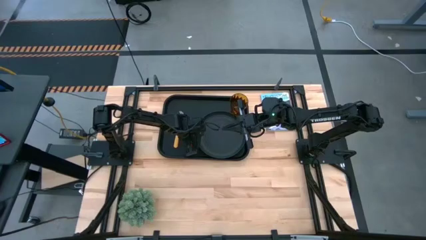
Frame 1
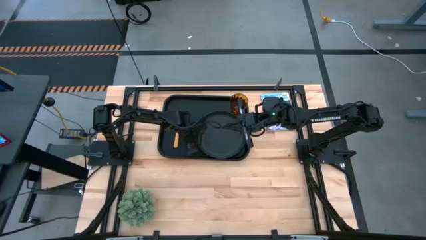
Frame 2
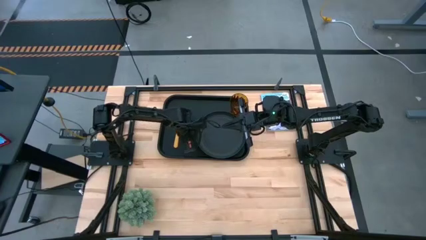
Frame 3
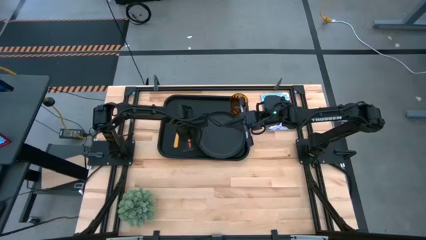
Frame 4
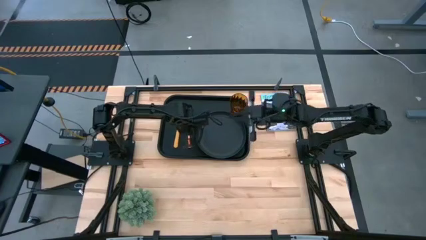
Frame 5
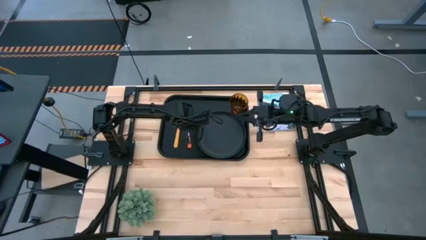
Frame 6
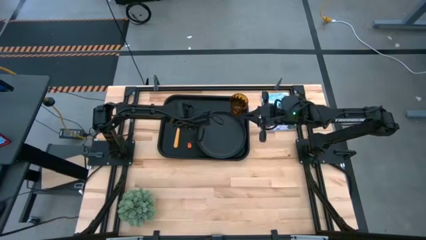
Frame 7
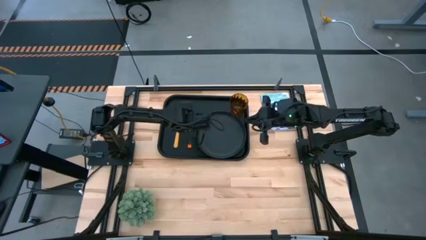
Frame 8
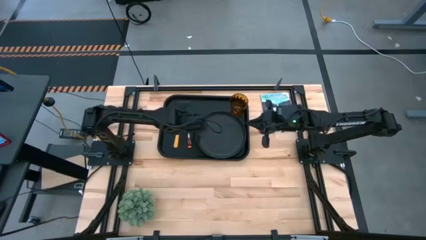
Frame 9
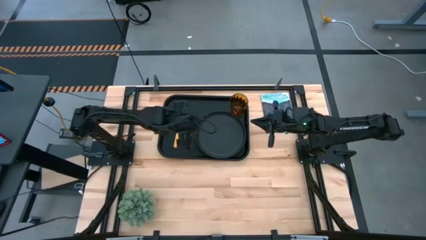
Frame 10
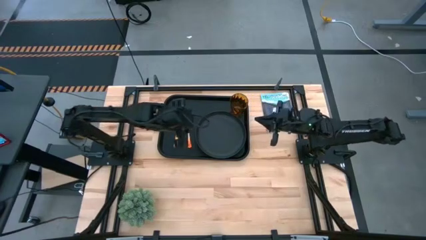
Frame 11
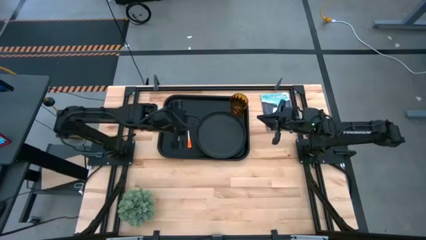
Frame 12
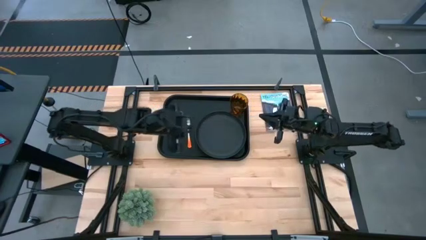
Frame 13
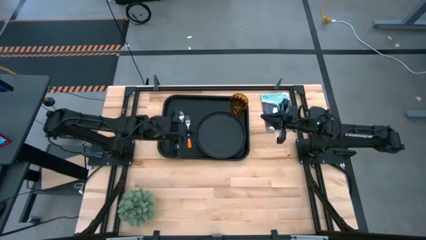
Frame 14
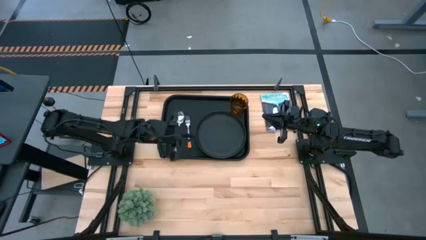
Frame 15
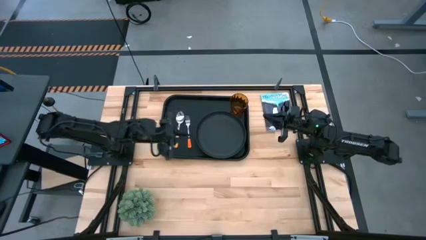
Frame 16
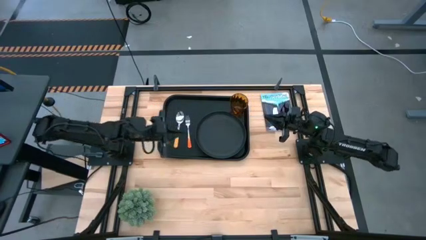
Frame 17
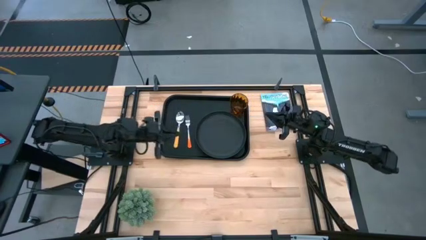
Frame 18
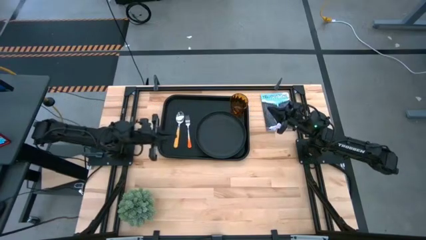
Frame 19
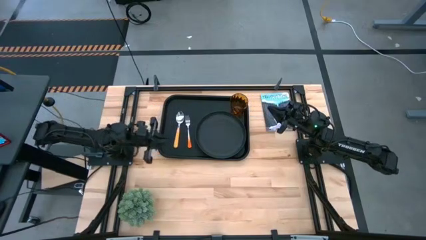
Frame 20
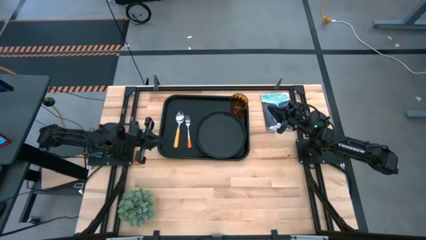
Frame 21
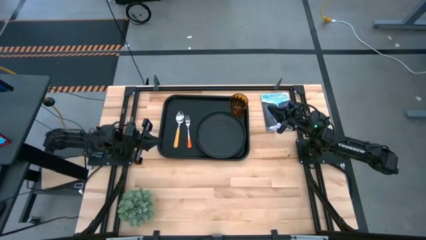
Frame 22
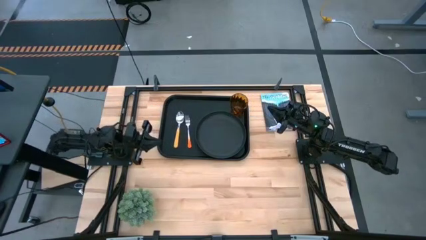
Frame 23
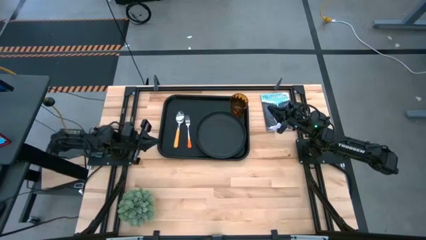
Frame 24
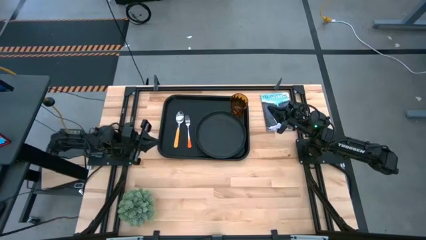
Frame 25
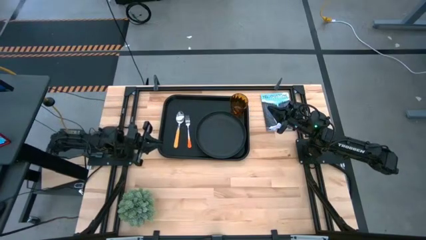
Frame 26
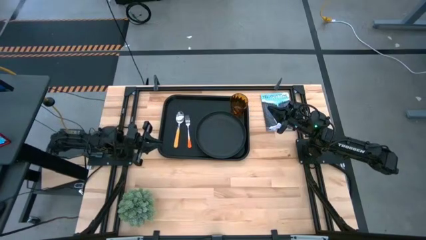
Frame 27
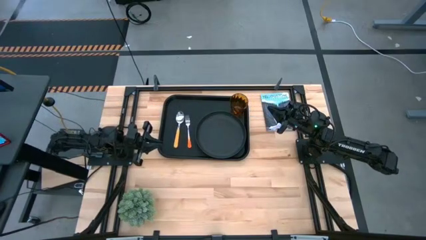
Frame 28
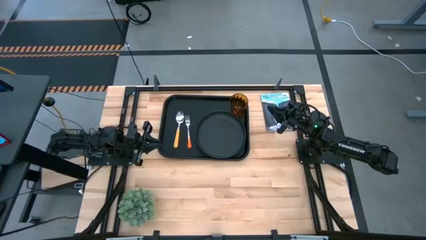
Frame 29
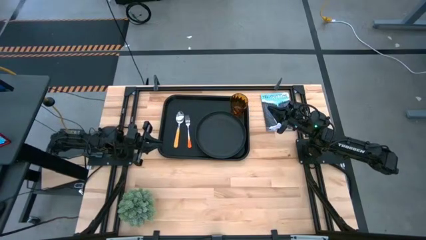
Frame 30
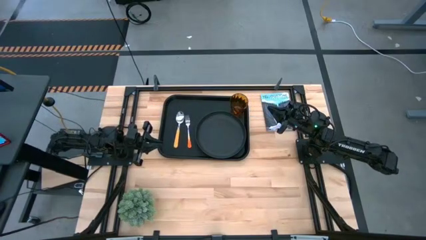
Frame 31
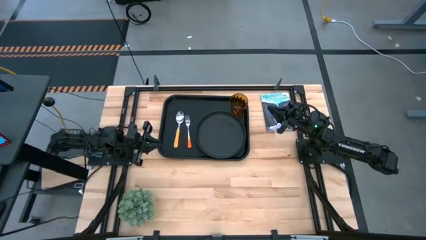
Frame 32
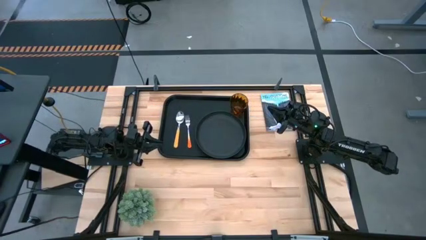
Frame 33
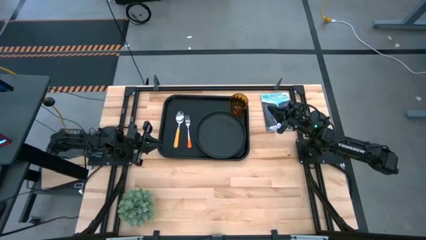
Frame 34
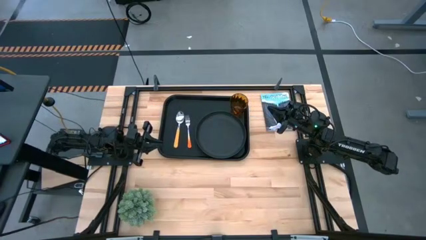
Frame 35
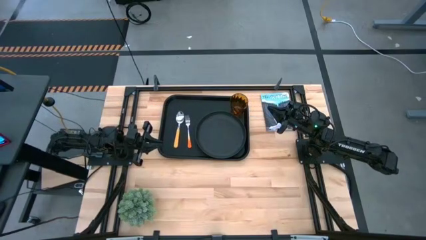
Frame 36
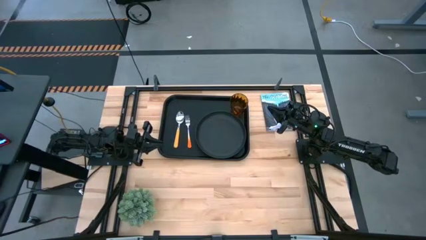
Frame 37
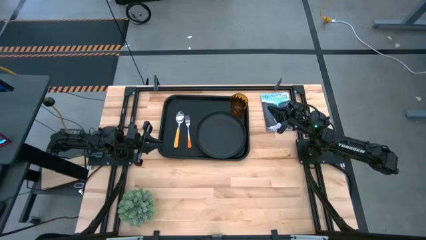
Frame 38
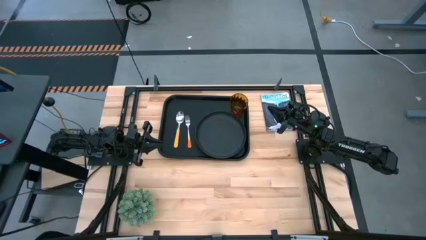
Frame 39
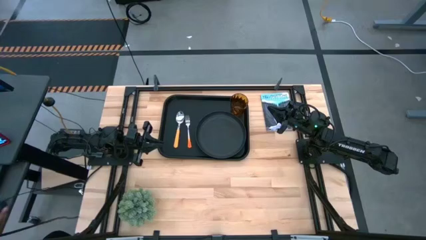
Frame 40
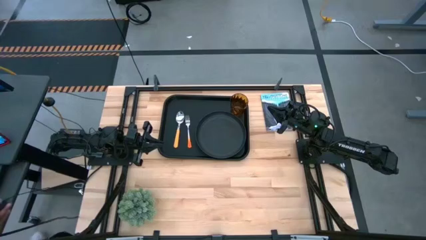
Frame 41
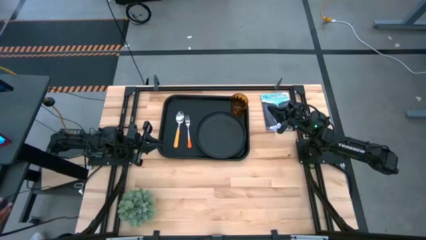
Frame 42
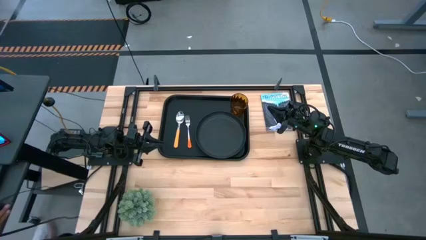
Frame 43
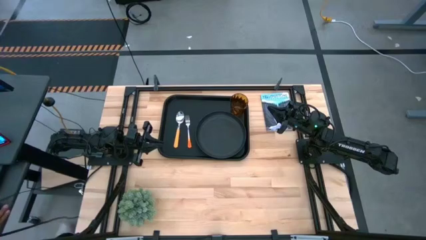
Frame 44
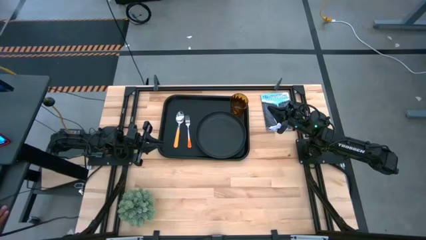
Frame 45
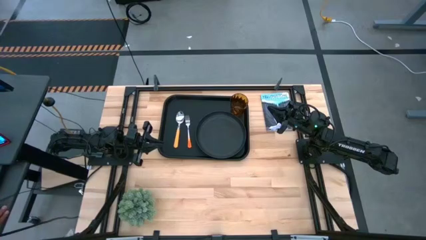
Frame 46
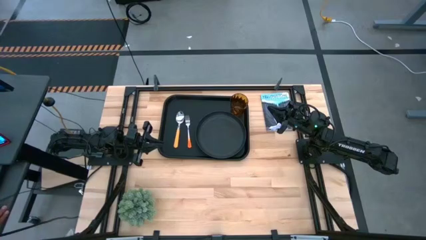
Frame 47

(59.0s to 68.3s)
Task: Pick and place plate/cup/fork/spoon on tray
Return to Home Position

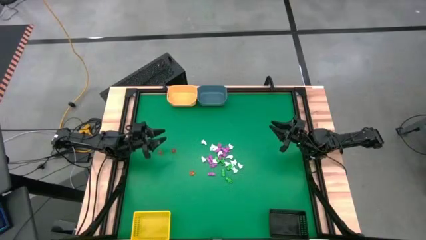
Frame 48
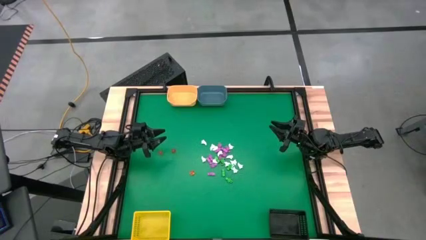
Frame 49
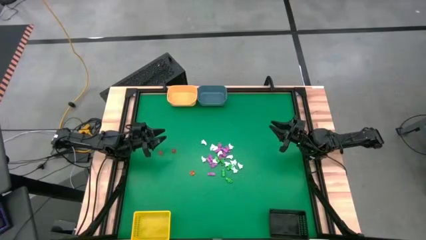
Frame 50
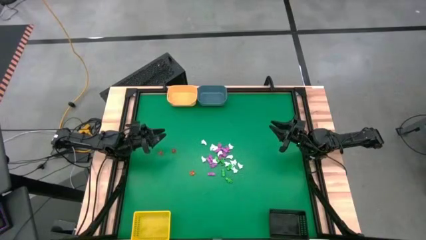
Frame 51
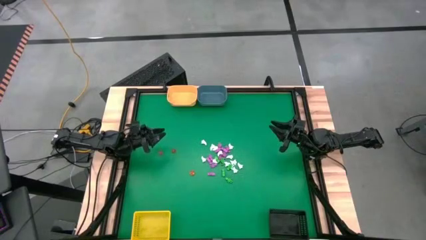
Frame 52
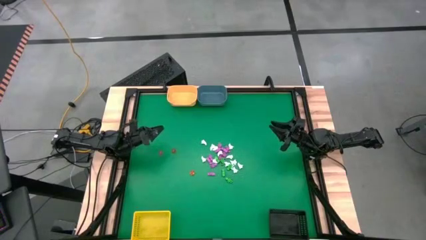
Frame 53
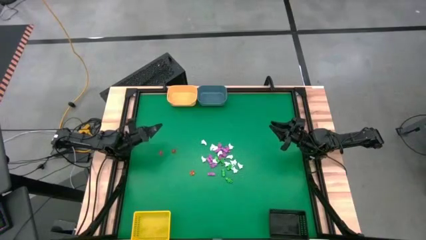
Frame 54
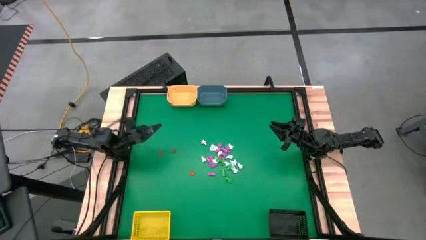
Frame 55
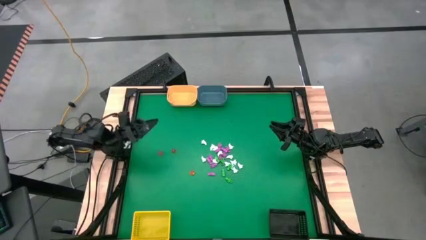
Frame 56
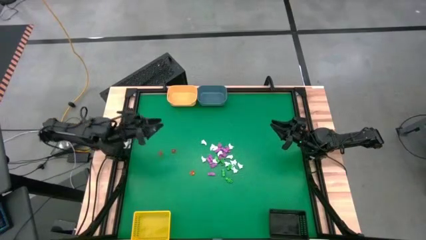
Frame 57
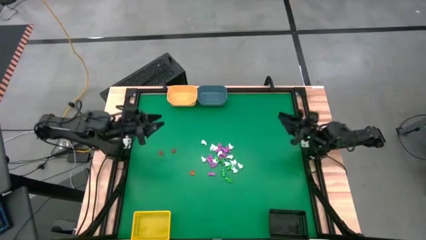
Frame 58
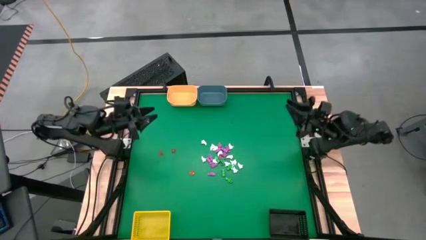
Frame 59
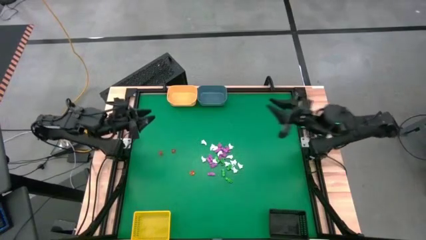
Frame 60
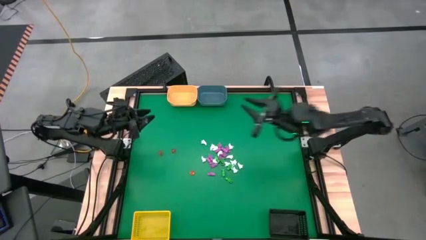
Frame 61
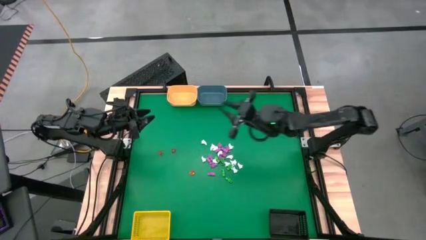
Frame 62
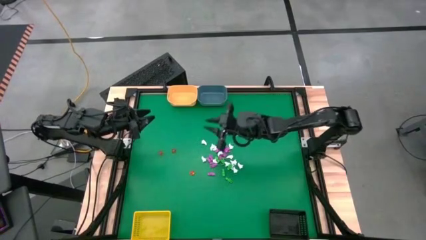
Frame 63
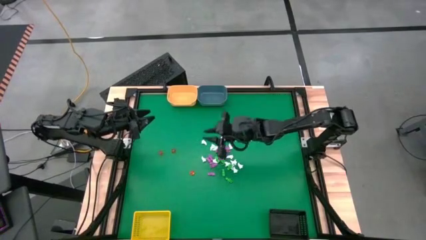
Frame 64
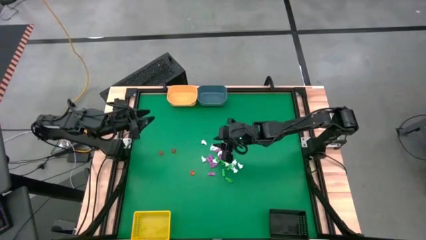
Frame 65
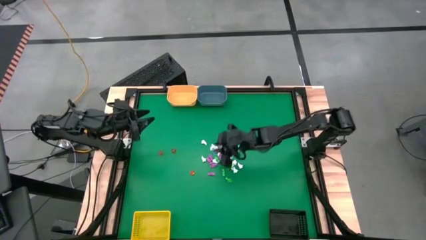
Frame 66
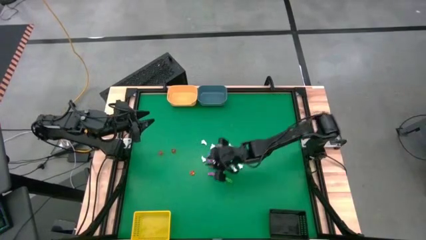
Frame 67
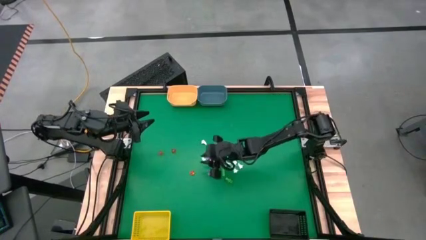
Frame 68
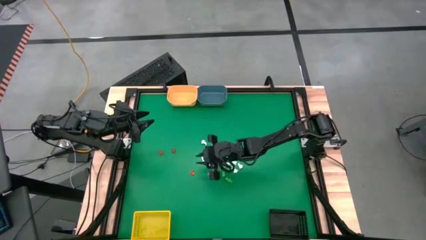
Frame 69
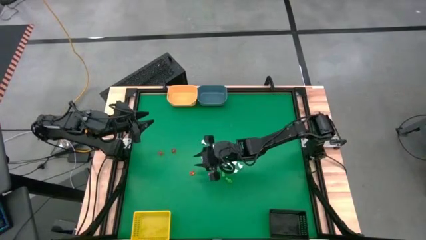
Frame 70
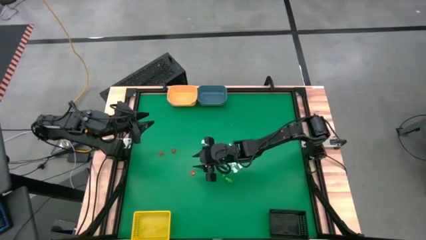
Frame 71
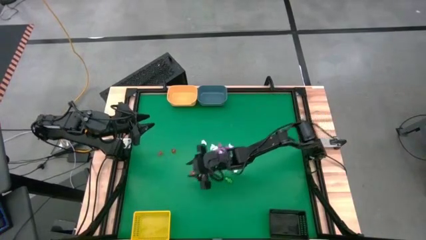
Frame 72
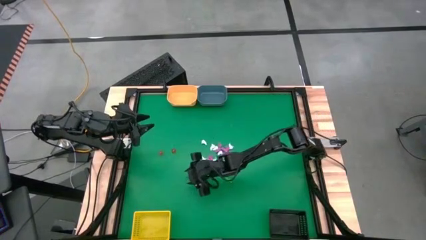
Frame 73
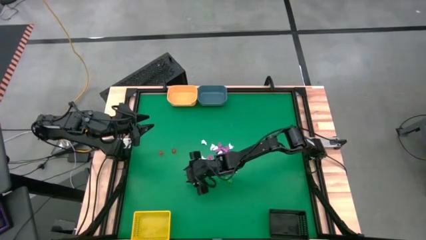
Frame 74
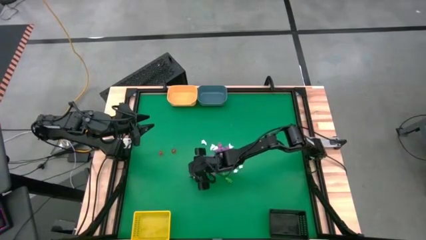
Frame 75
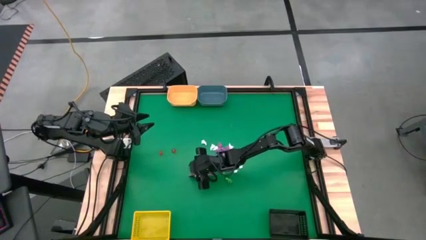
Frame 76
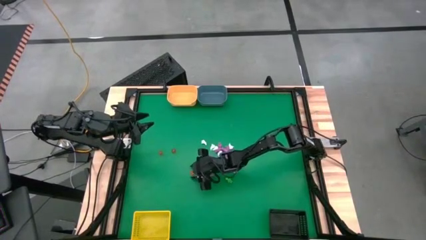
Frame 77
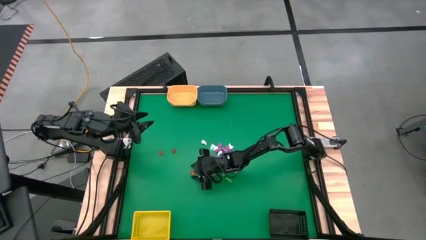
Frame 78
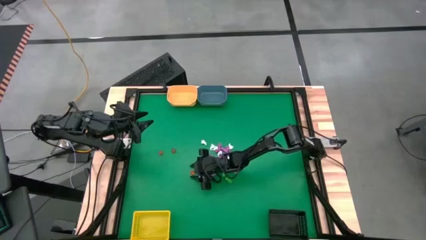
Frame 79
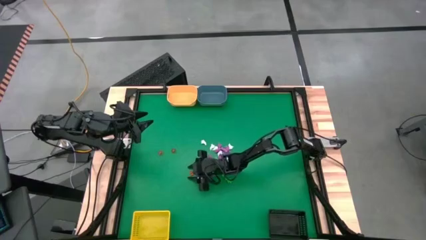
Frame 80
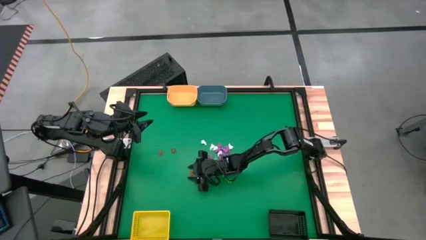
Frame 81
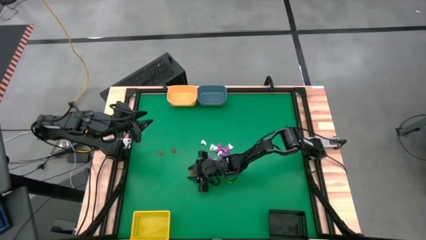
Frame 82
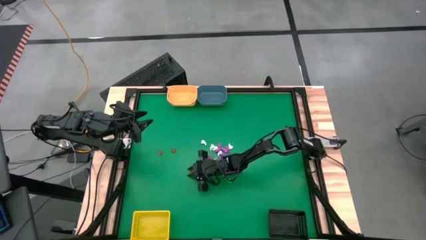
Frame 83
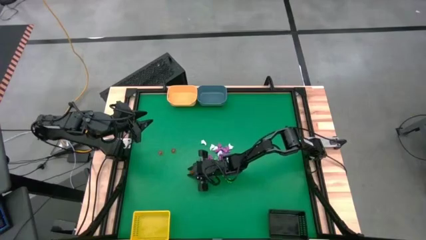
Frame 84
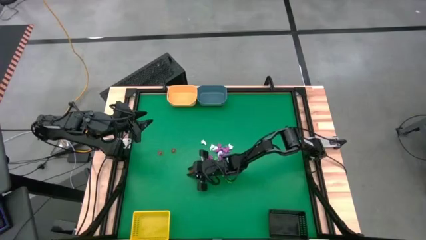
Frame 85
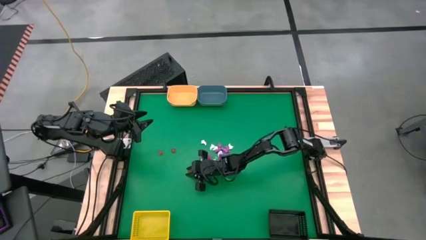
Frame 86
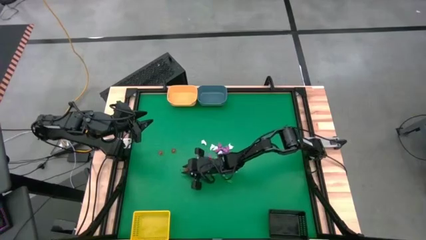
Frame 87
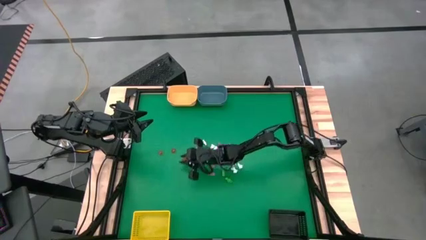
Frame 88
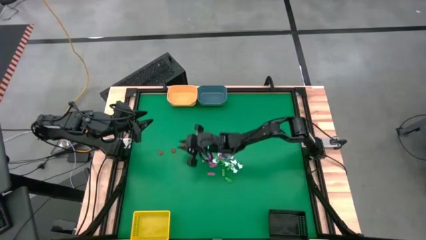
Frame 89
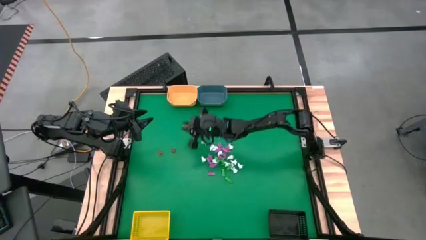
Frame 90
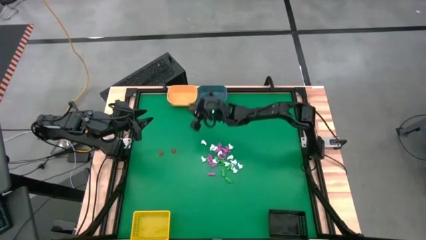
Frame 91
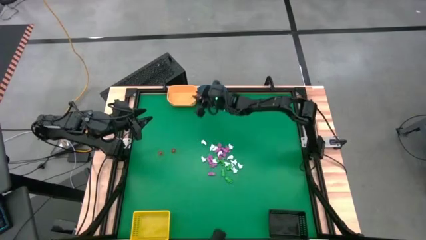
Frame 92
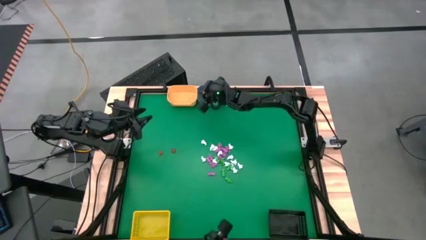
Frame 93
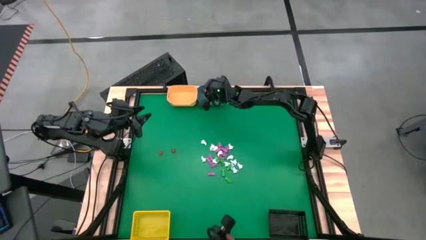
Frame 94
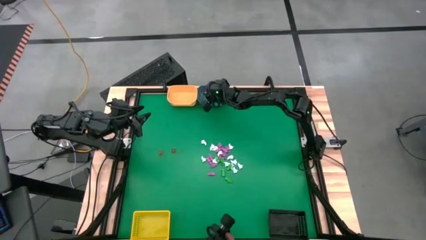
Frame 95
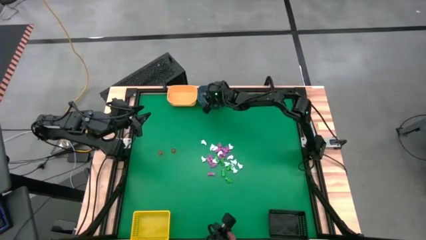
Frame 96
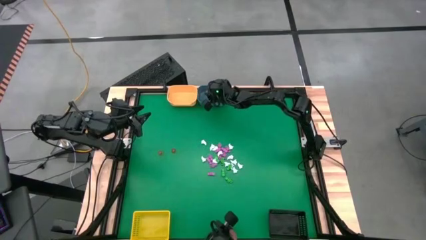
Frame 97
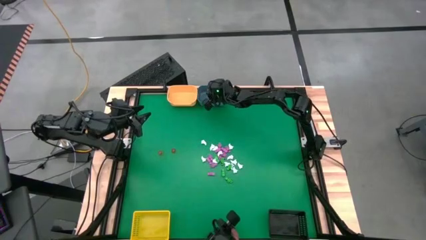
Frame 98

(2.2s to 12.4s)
Task: Sort Halloween decoration
Put the orange pumpkin into the gray bin
